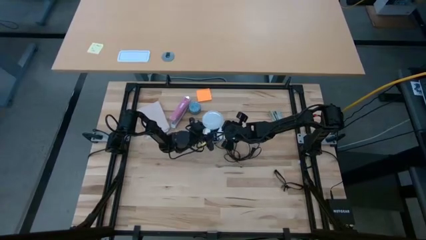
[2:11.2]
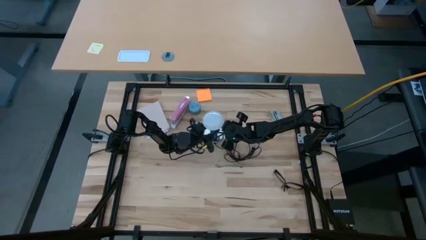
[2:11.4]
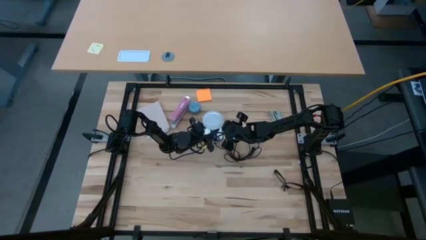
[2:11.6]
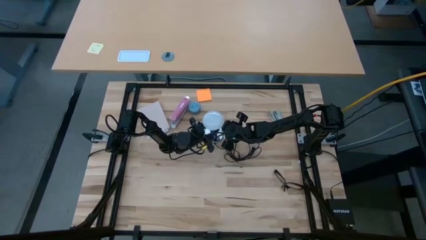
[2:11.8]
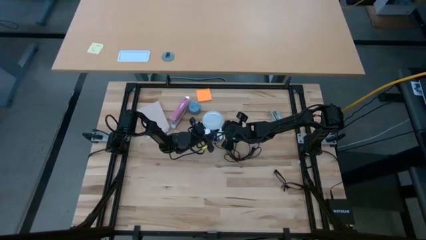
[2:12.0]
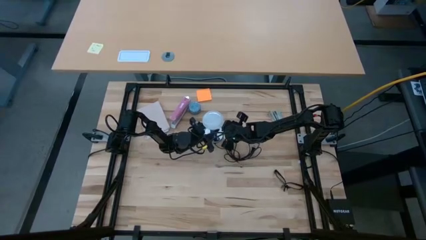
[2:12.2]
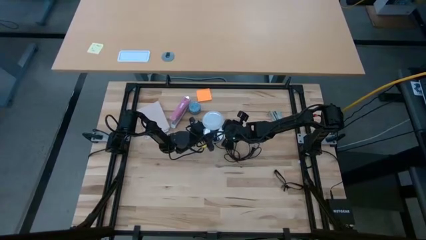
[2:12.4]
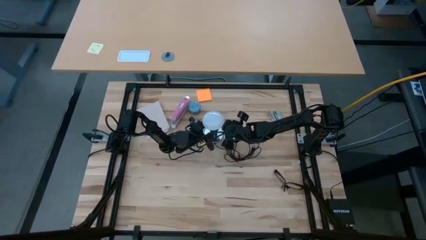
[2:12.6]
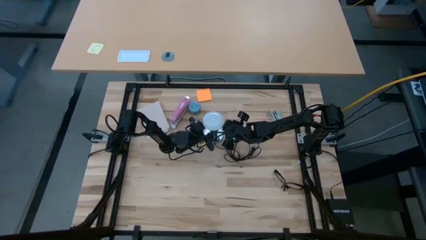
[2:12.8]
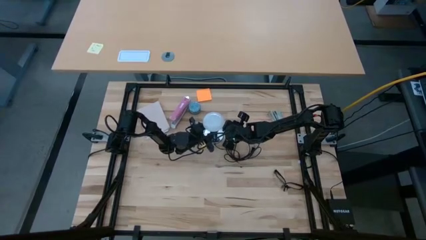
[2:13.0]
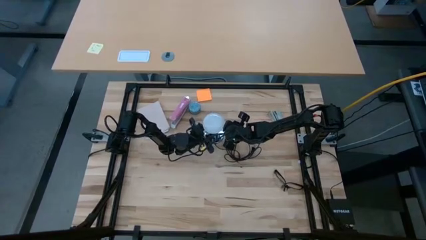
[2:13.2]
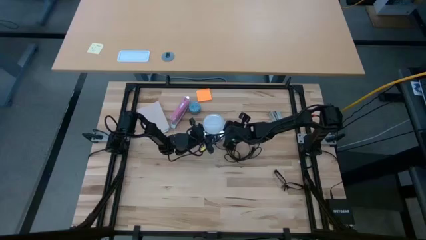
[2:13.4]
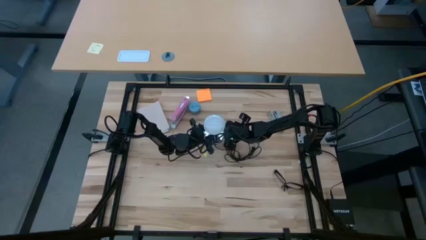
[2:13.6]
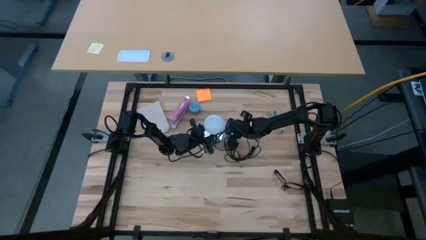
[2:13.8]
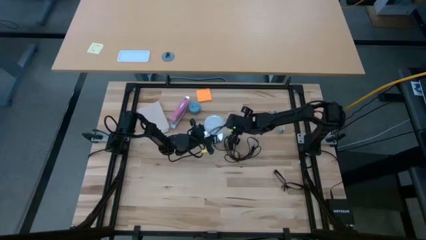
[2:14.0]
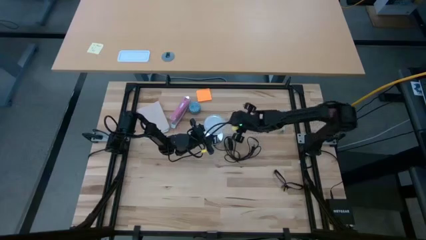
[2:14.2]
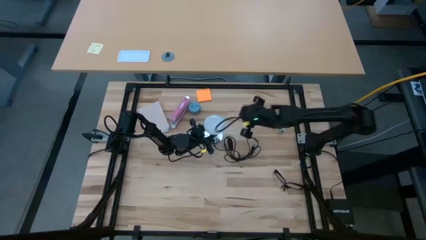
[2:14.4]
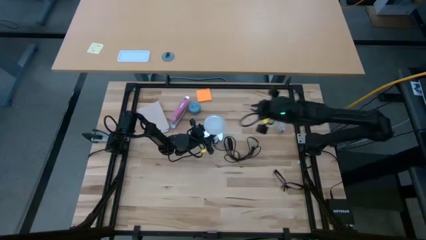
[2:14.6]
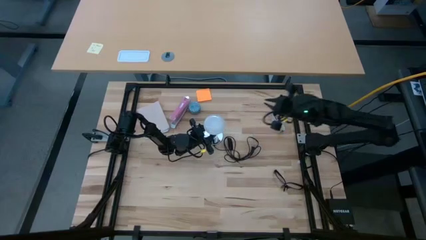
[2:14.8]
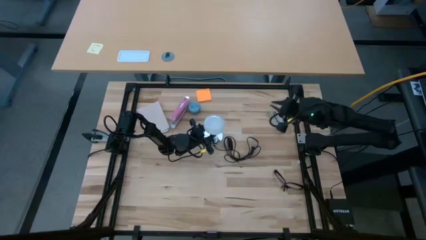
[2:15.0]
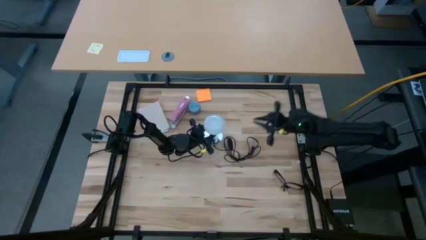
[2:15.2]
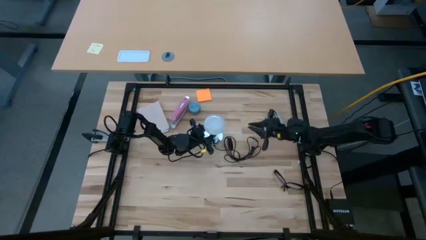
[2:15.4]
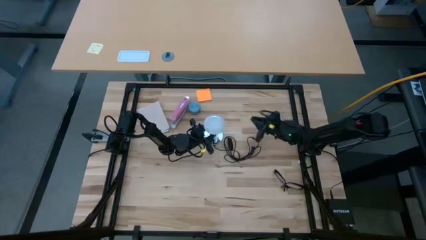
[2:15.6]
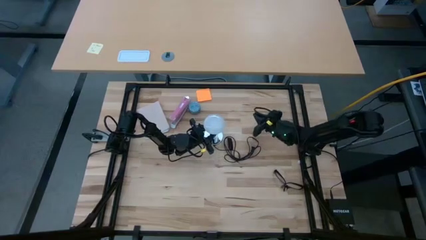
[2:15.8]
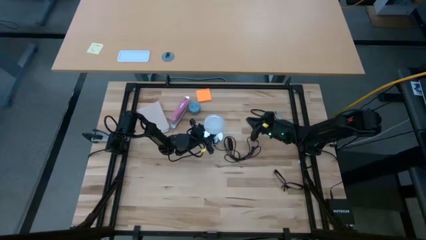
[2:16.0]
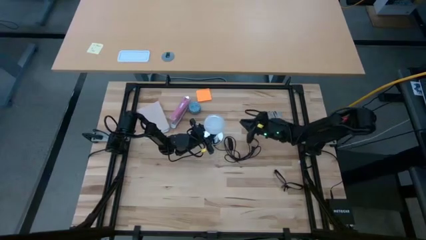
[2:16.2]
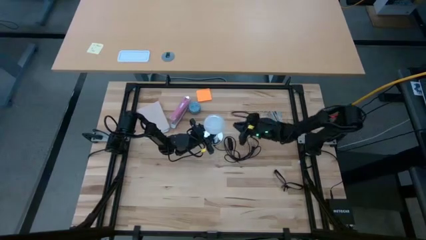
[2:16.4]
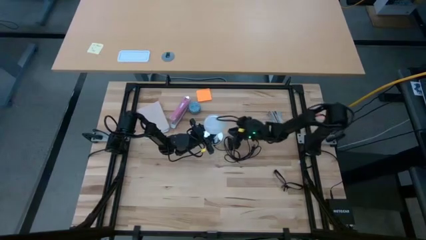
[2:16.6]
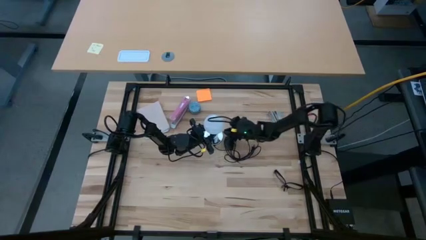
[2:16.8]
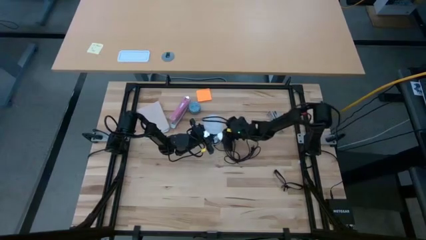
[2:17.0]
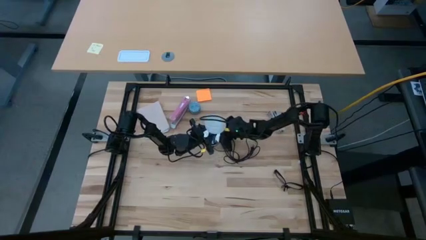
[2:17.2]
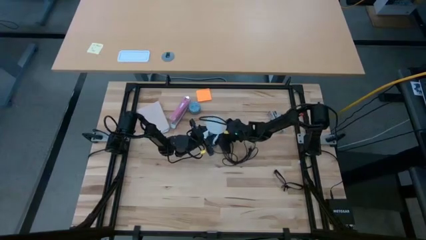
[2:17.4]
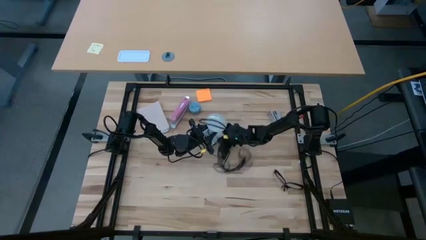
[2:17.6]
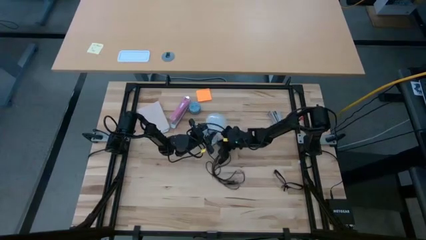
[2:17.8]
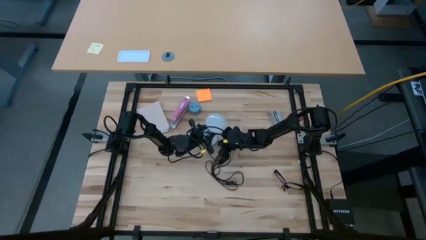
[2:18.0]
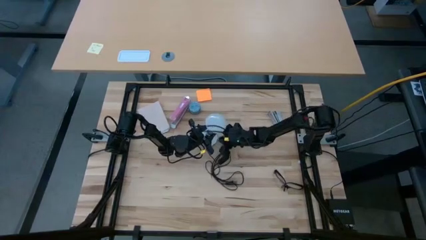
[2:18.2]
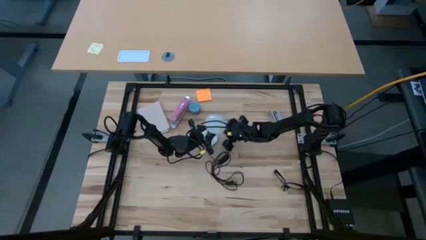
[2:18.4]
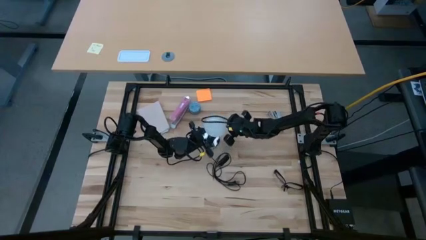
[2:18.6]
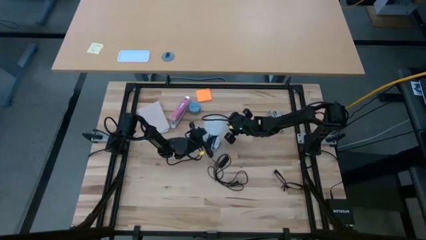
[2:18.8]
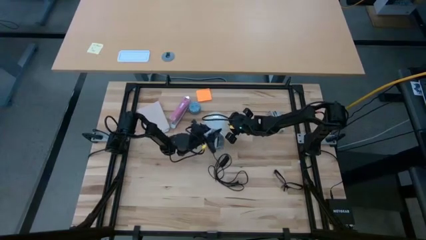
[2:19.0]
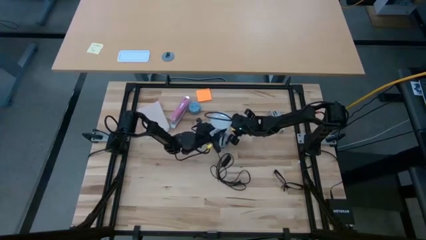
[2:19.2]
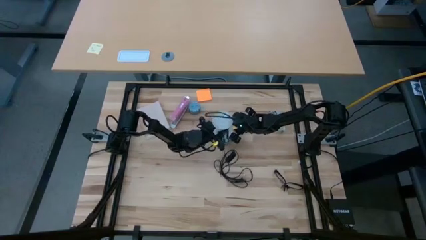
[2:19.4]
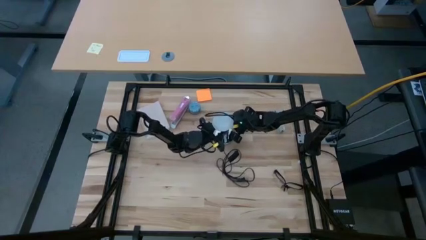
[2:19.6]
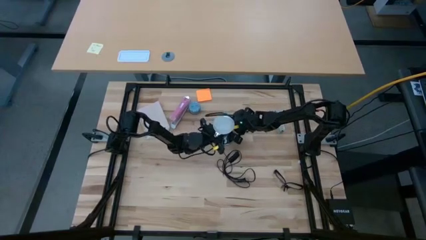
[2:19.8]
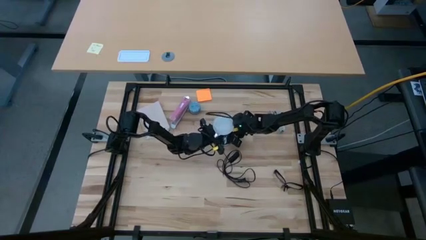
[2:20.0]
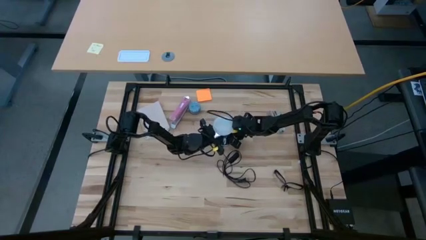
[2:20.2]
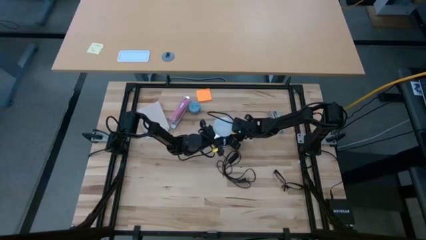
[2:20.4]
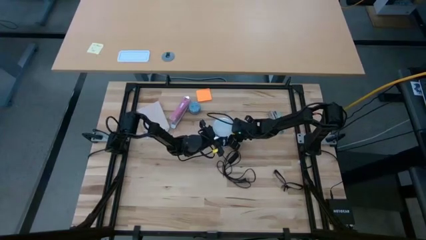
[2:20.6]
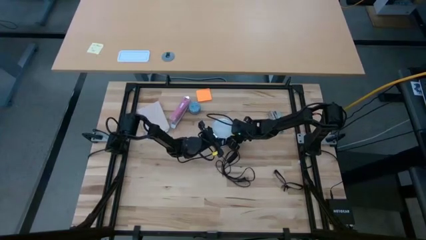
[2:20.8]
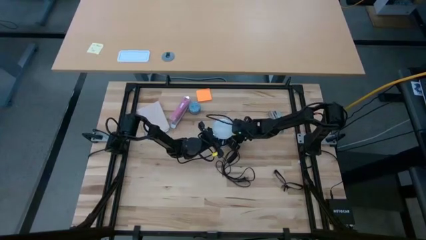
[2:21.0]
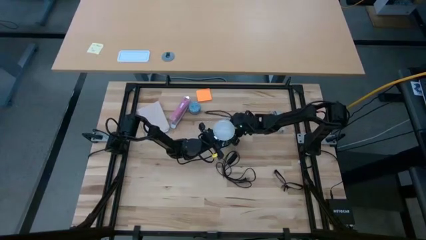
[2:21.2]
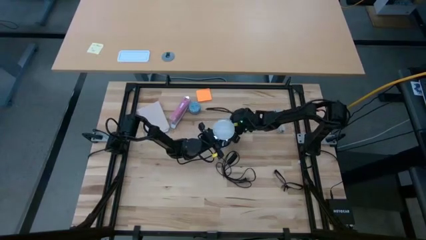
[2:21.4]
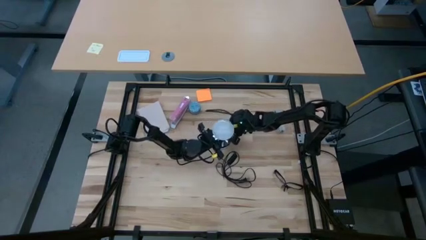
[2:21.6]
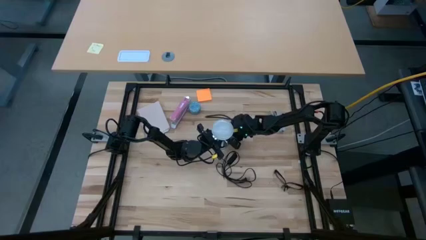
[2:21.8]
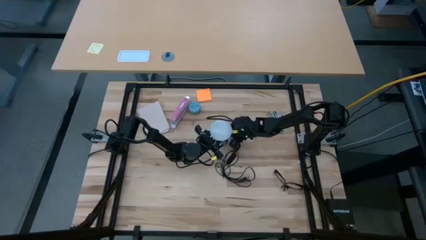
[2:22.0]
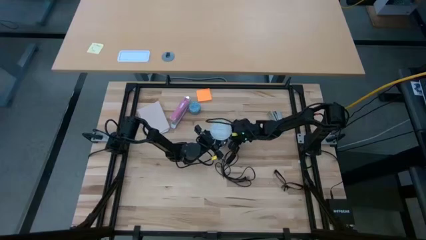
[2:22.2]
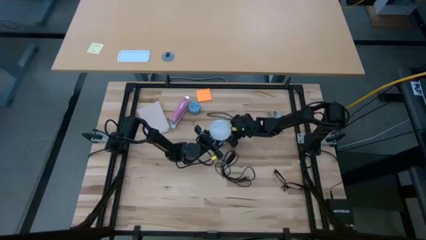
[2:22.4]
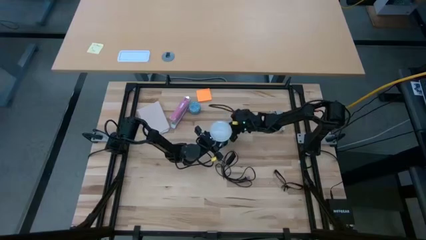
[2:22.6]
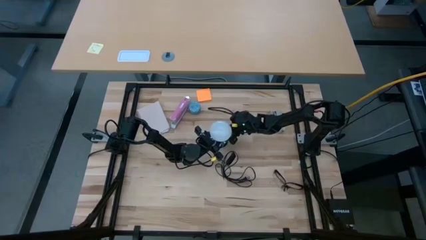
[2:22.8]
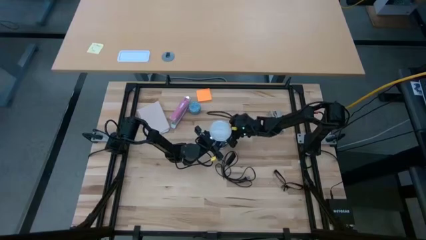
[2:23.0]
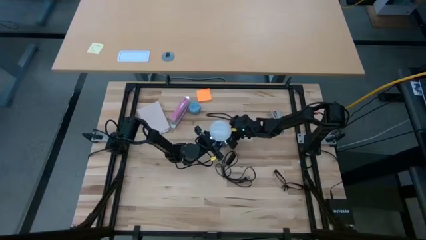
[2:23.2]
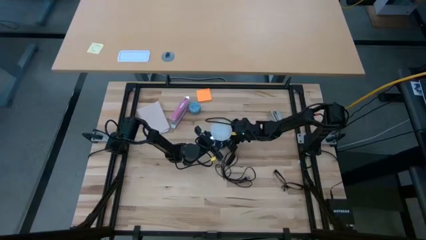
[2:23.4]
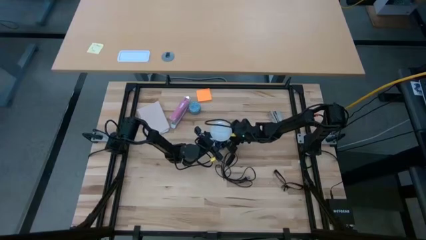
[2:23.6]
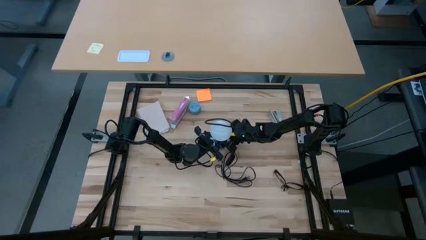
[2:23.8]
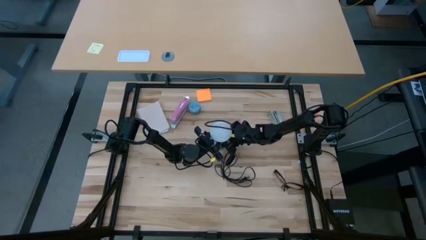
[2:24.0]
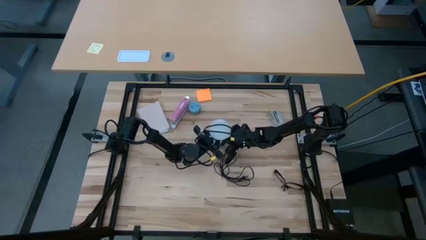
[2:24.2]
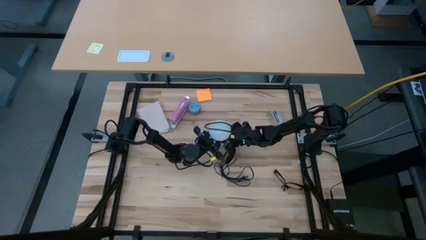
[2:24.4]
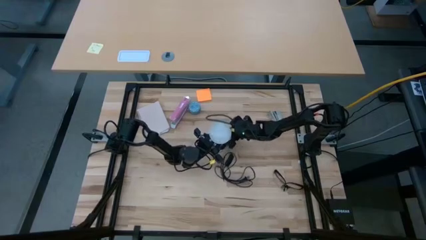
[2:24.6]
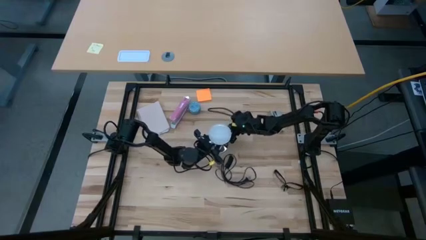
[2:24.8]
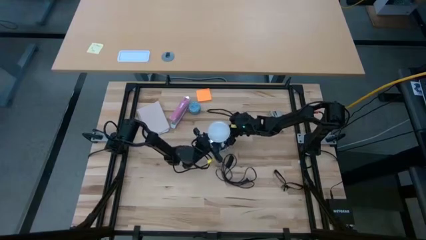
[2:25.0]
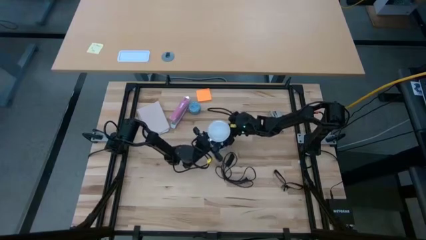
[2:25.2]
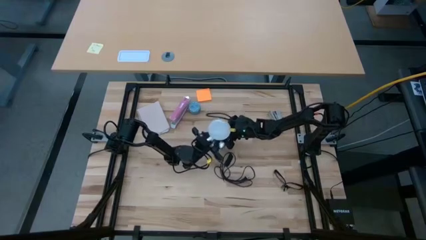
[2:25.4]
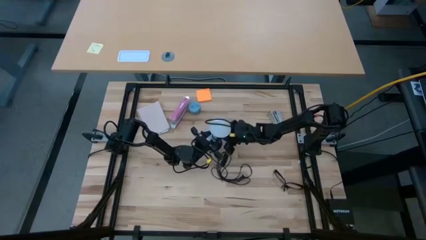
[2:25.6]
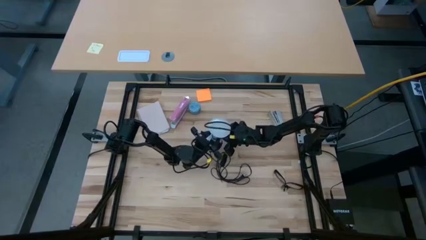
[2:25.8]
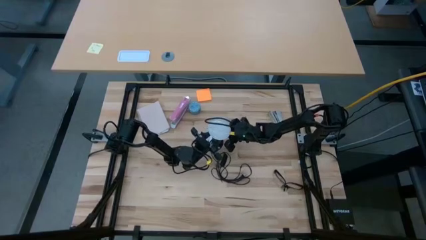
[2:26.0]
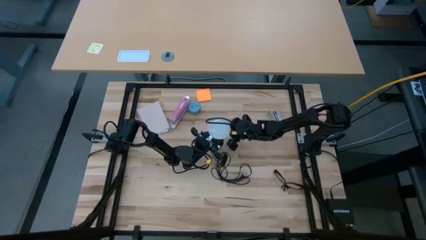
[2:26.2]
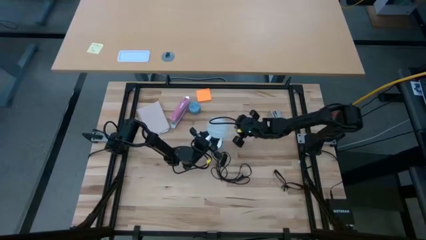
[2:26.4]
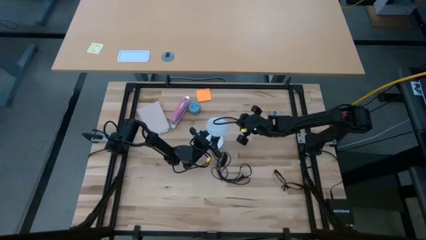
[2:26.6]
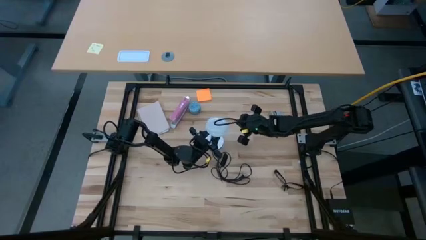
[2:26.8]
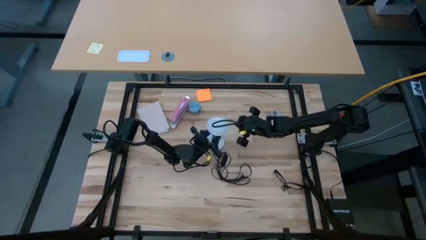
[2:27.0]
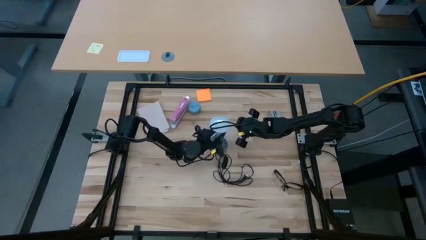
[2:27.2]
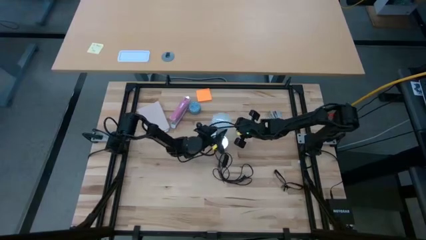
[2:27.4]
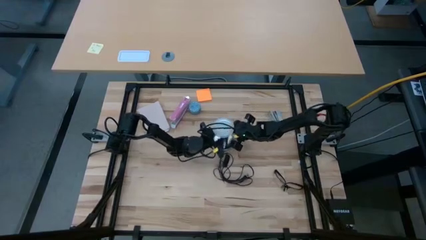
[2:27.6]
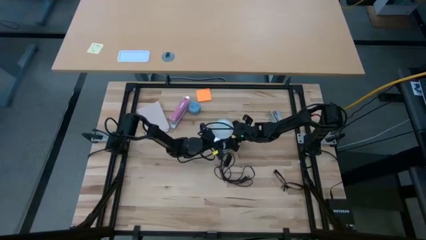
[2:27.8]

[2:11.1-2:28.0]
Task: Screw lightbulb
Remove the lightbulb from the lamp
